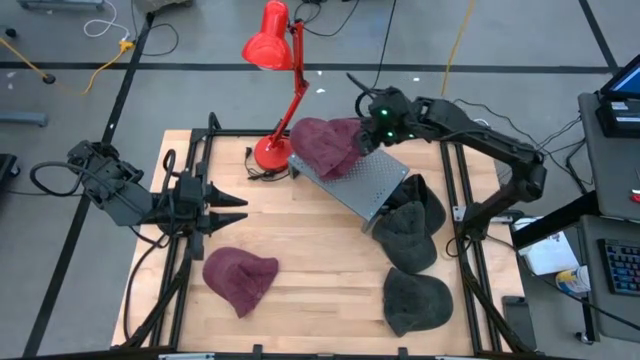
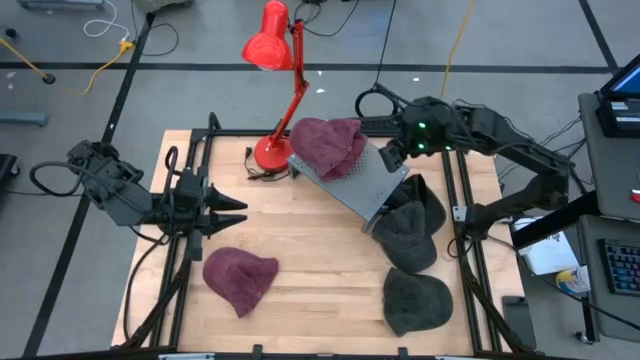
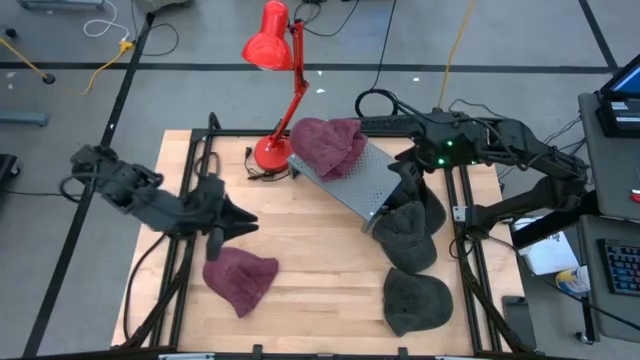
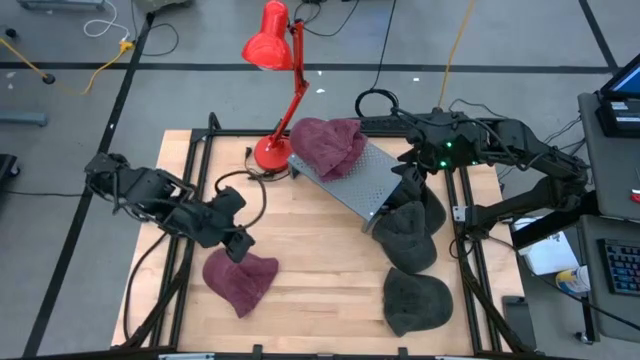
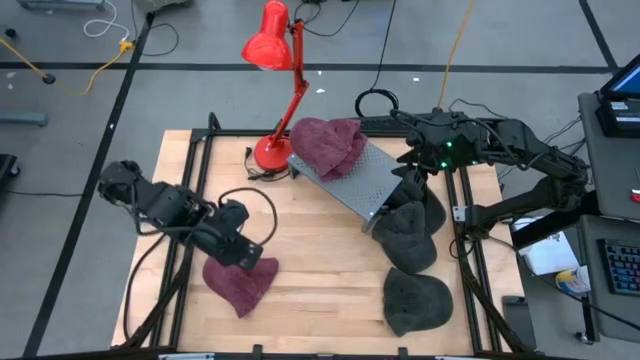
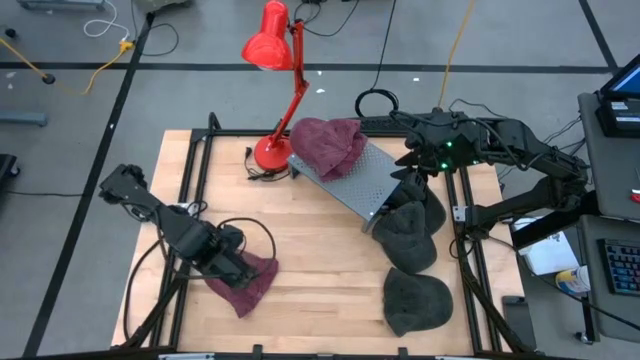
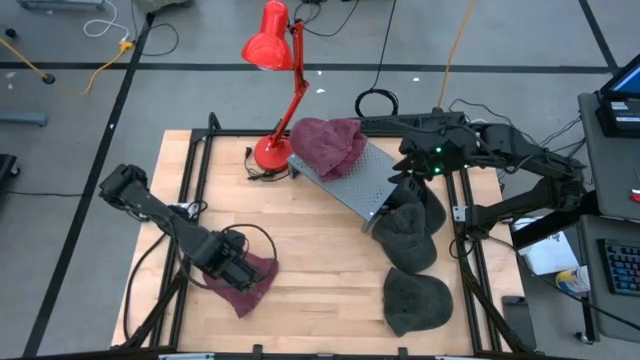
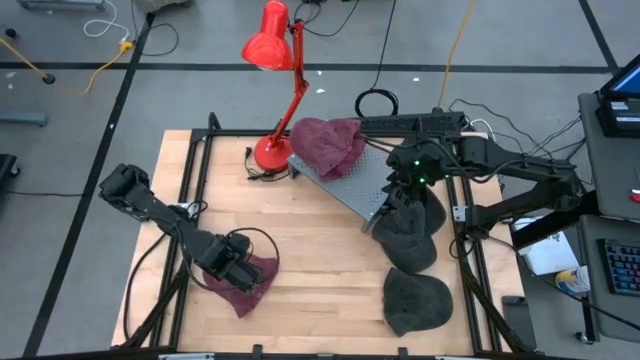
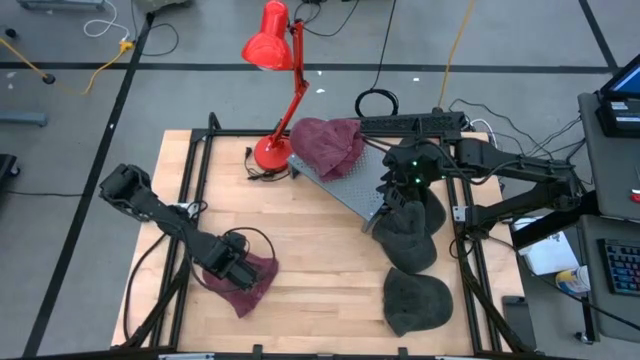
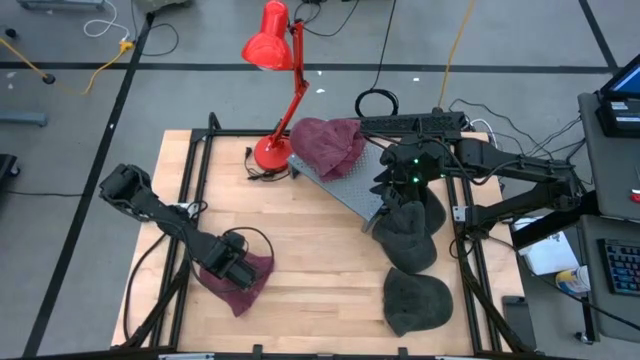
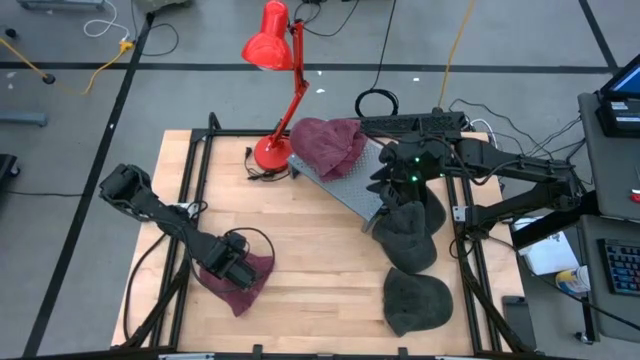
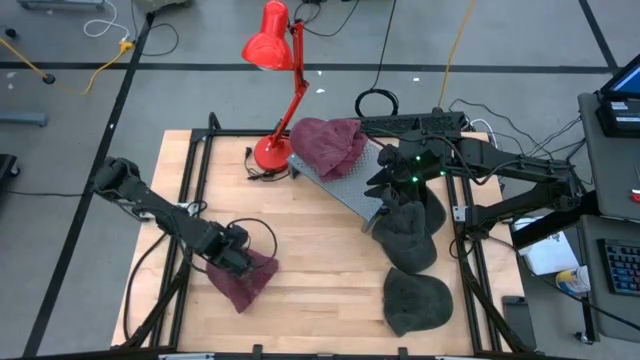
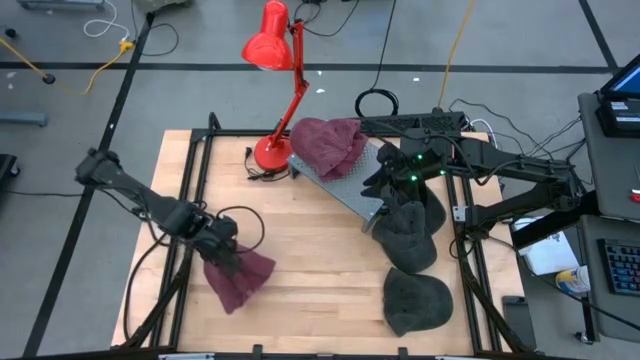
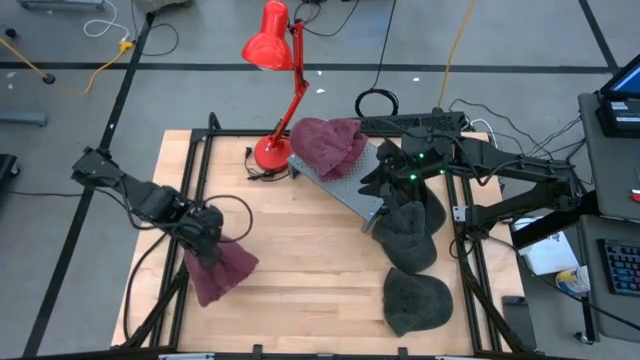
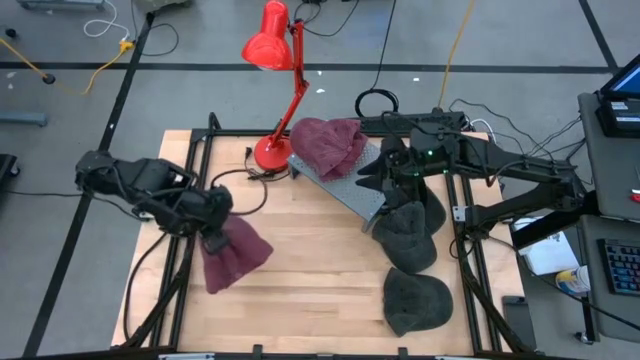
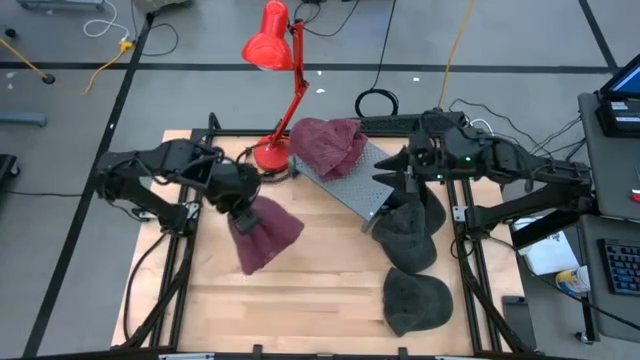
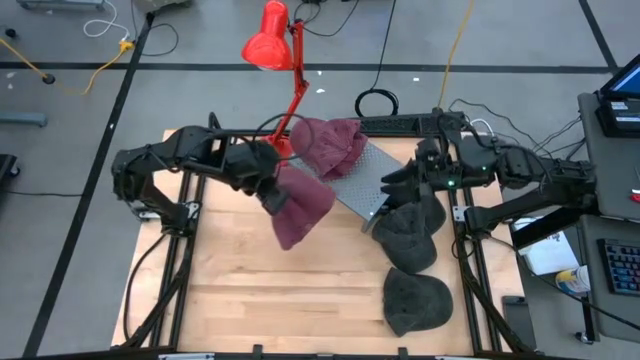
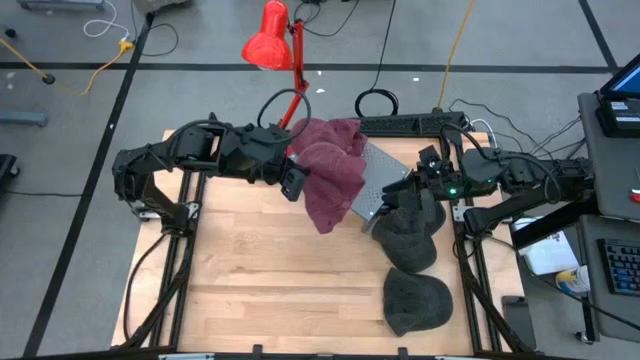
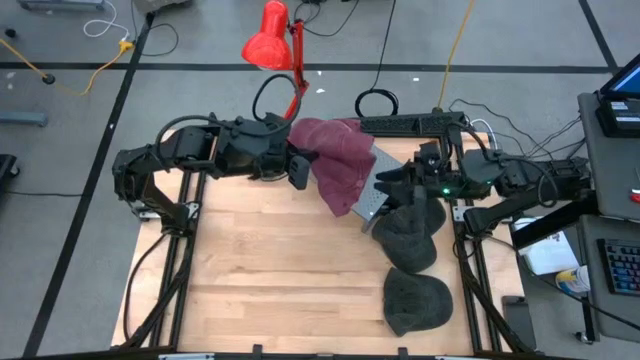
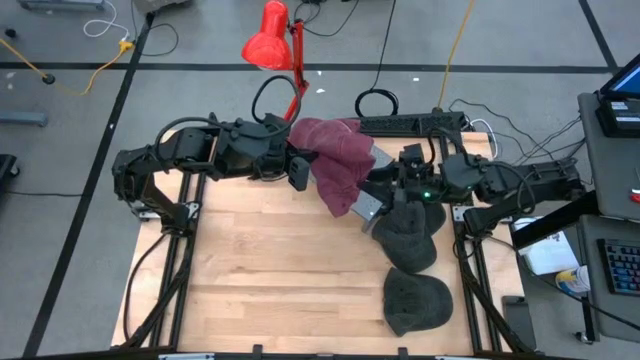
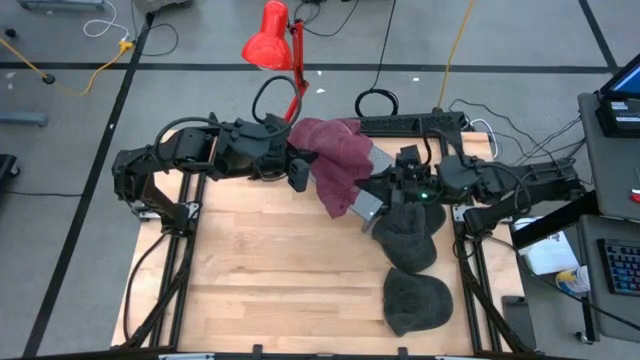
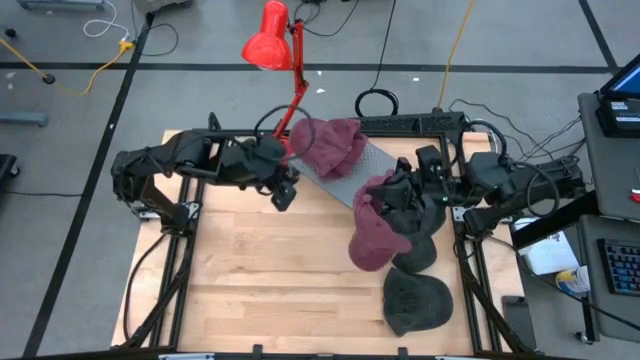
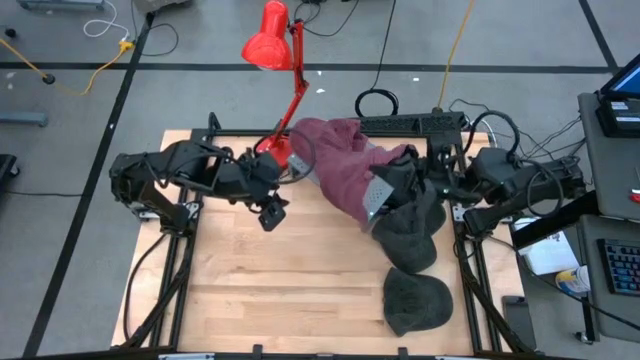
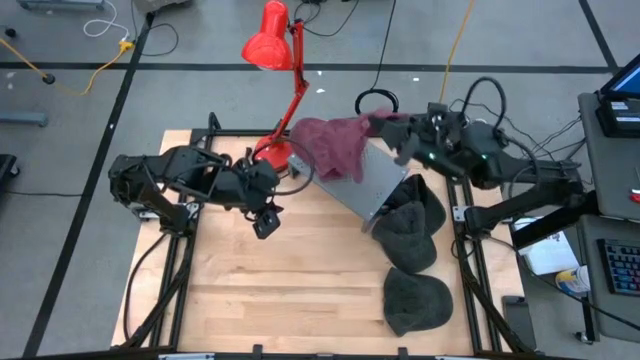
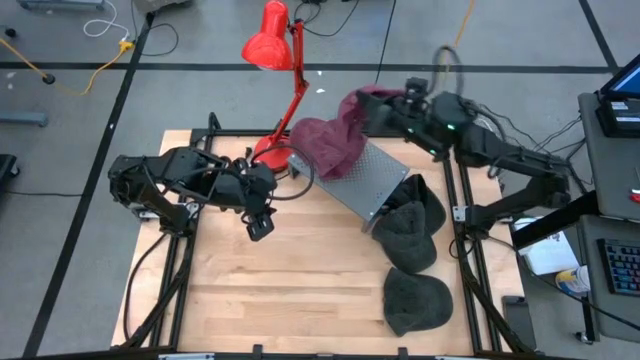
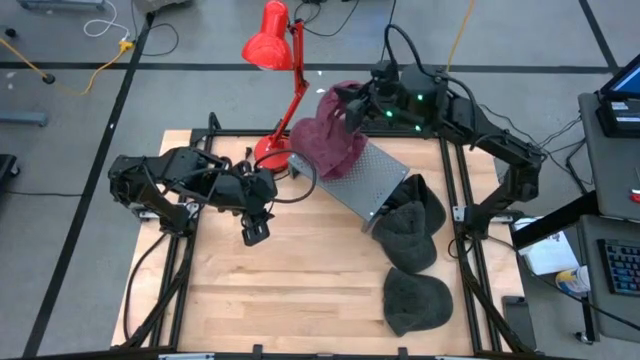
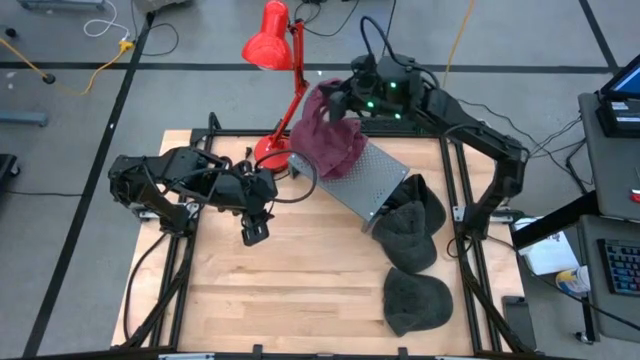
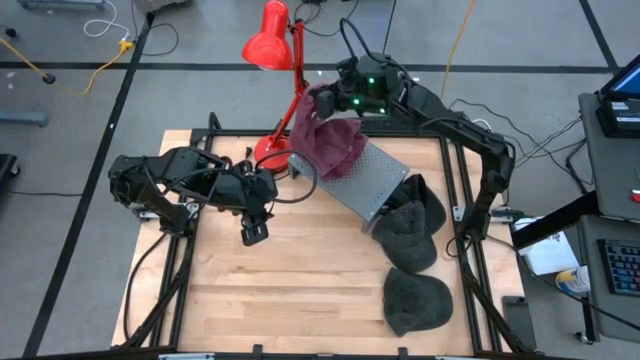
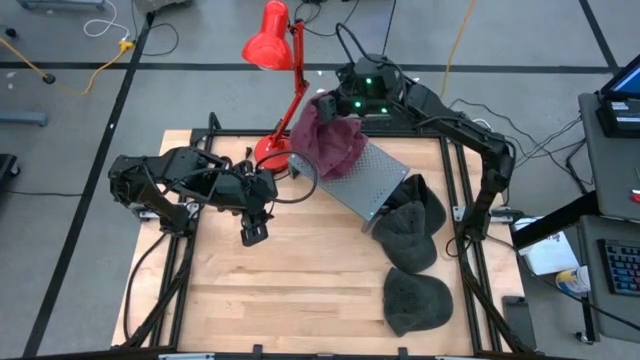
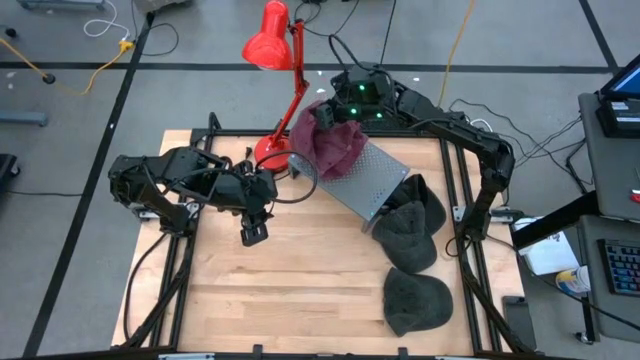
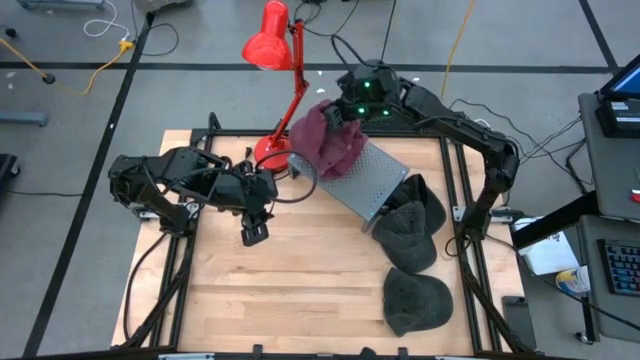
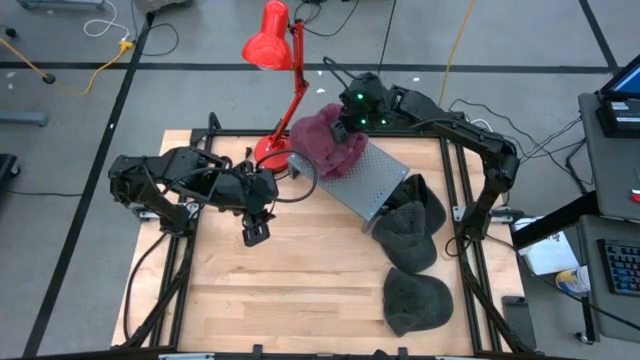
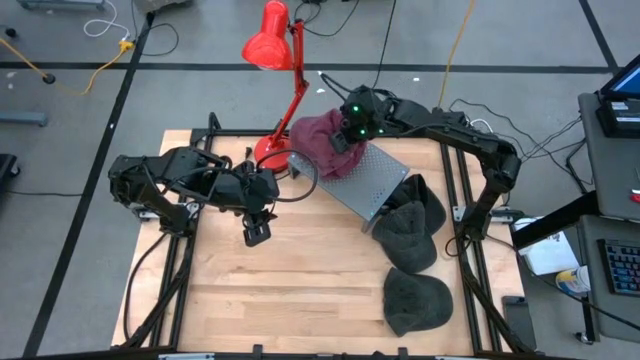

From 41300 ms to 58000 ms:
Task: Pick & Place hat
Stack the red cap on top of the red cap on the shelf

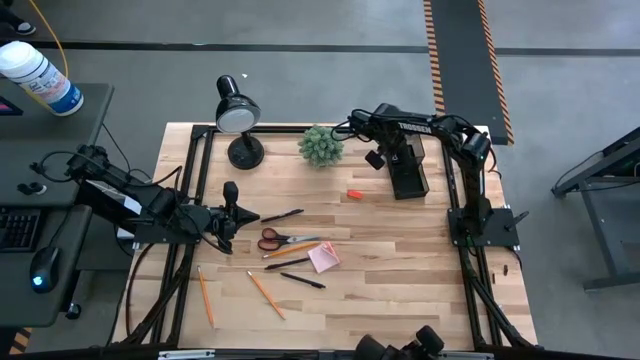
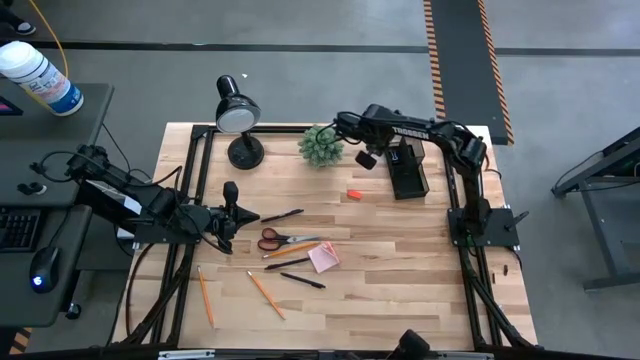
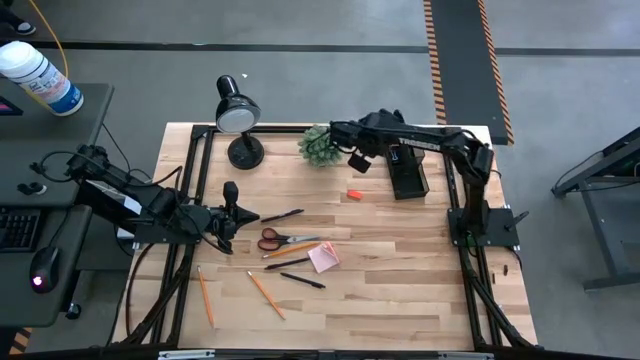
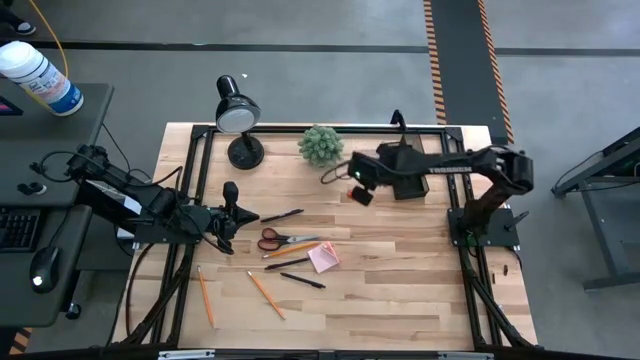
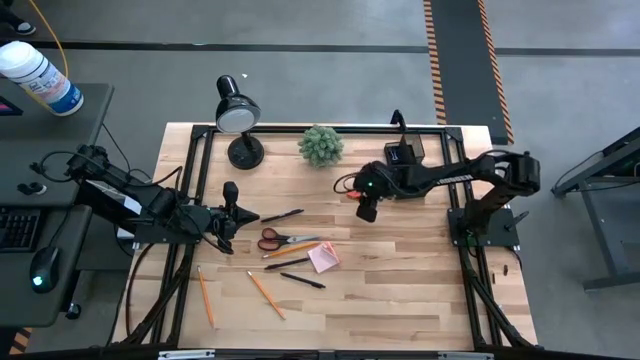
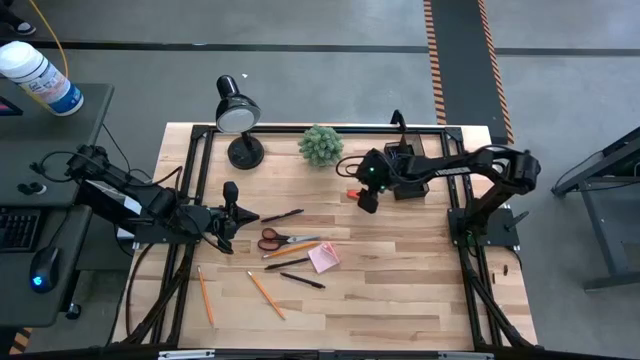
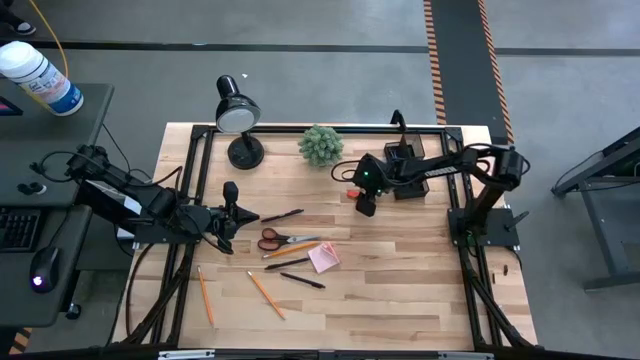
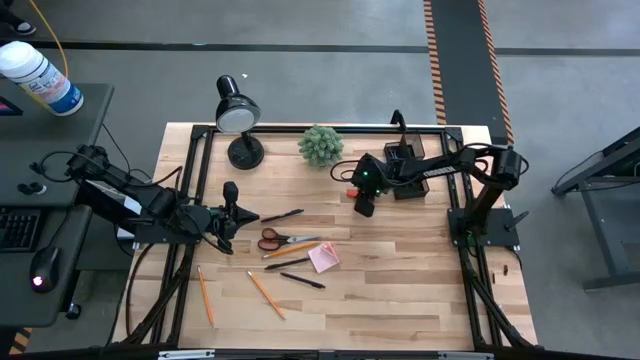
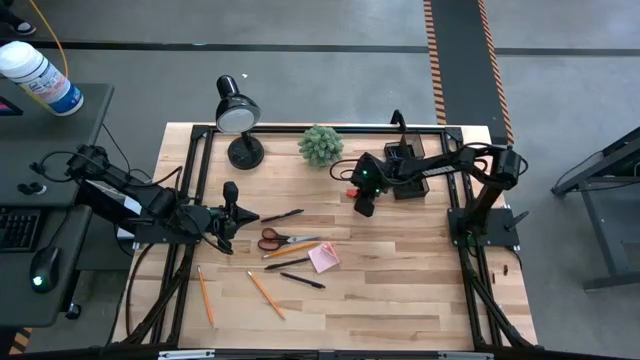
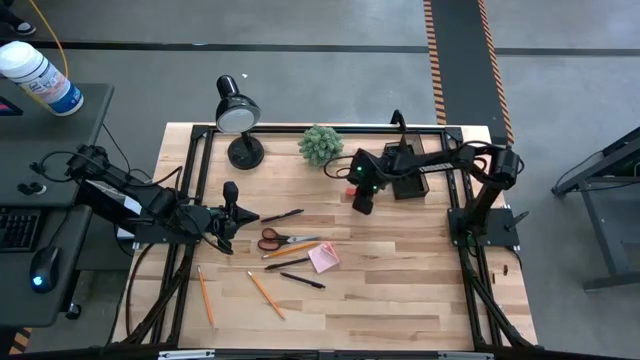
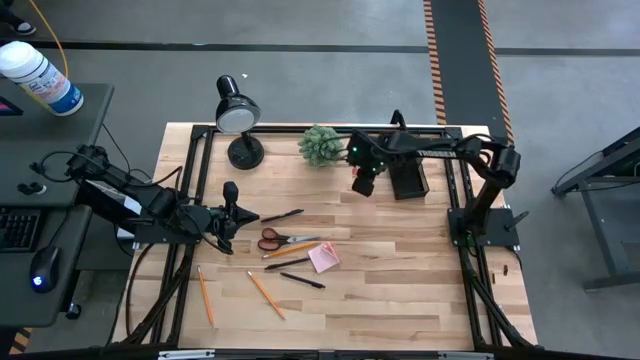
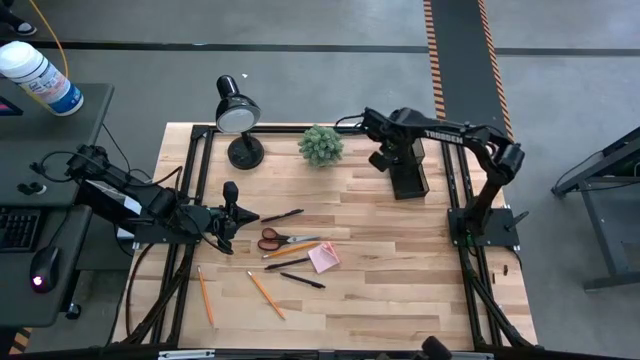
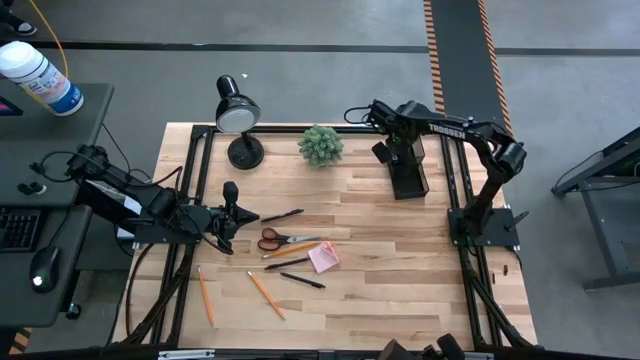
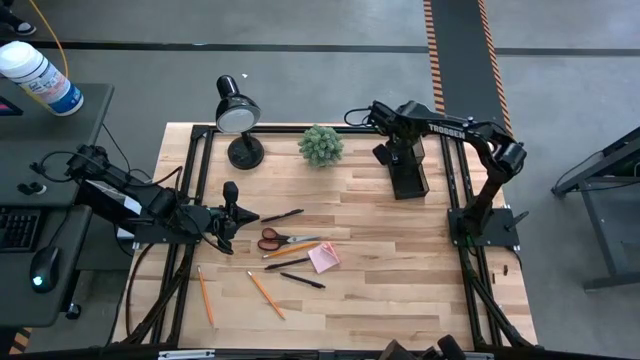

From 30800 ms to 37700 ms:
Task: Pick and place office supplies into organizer
Put the eraser into the desk organizer
